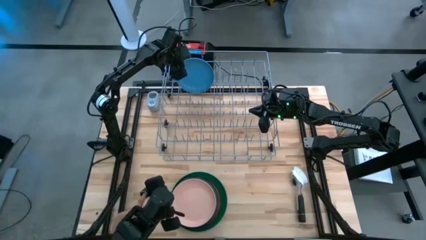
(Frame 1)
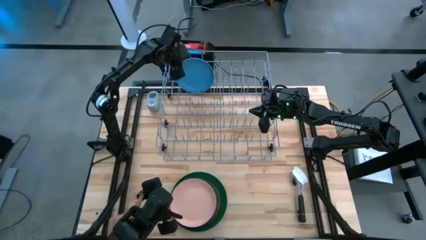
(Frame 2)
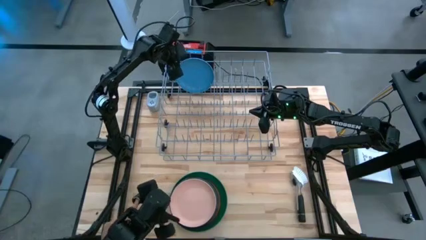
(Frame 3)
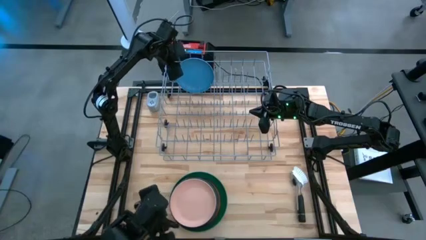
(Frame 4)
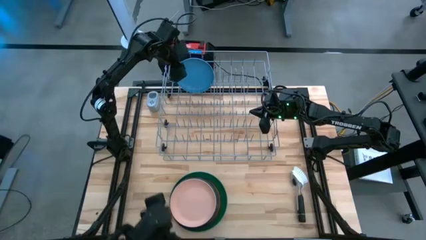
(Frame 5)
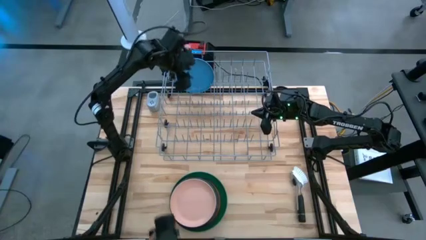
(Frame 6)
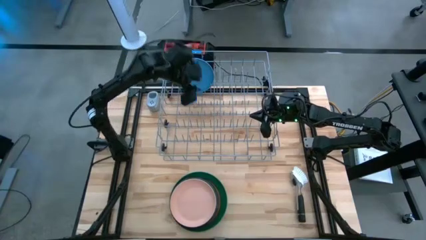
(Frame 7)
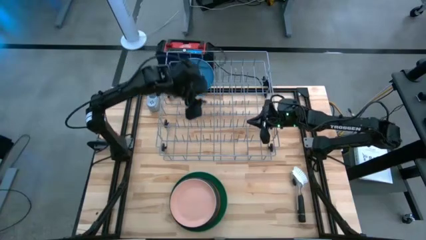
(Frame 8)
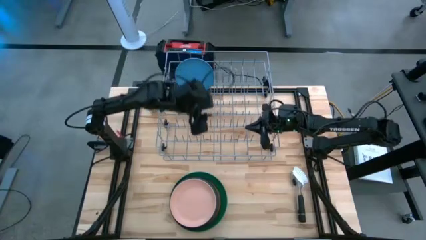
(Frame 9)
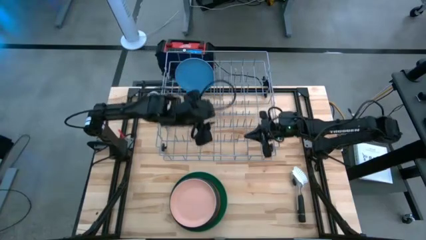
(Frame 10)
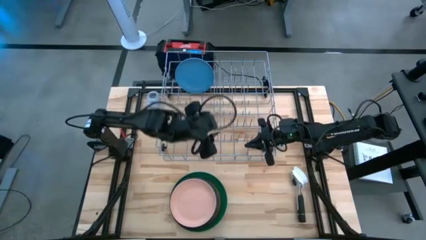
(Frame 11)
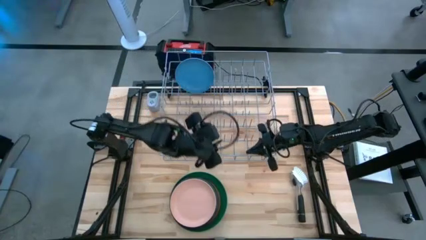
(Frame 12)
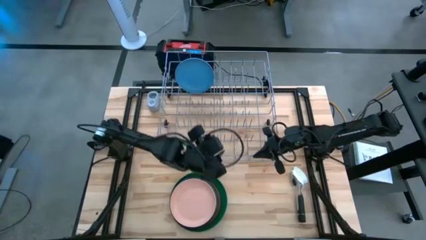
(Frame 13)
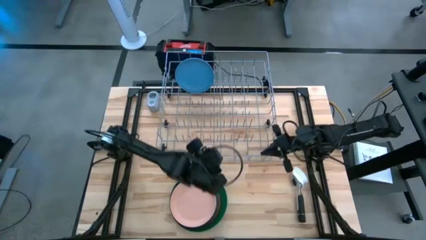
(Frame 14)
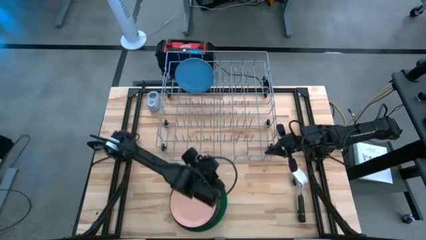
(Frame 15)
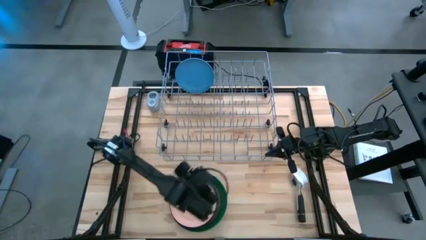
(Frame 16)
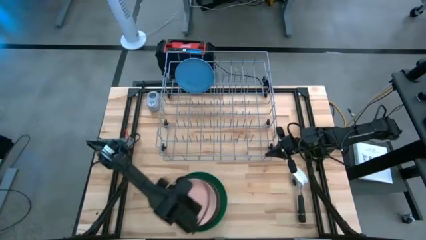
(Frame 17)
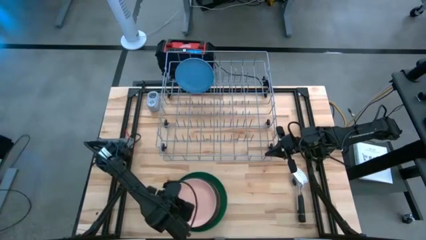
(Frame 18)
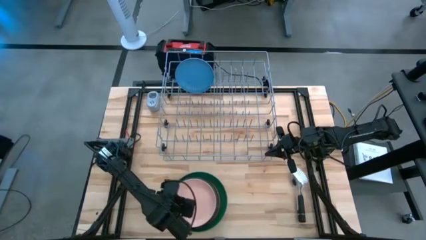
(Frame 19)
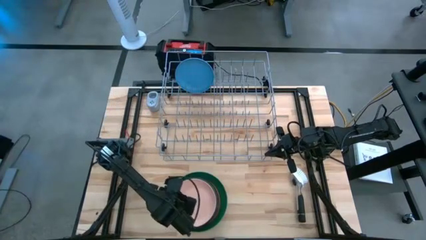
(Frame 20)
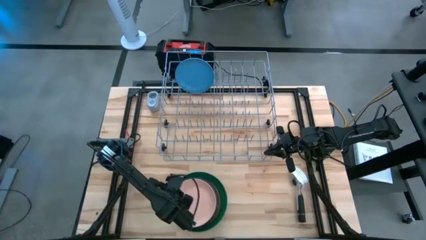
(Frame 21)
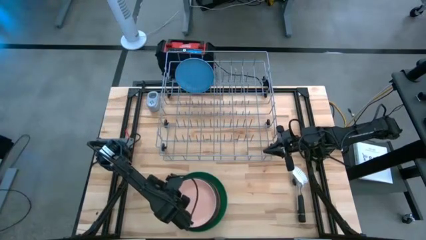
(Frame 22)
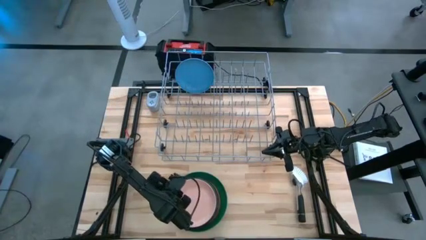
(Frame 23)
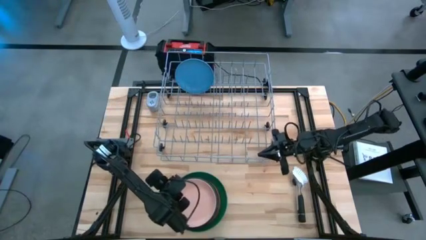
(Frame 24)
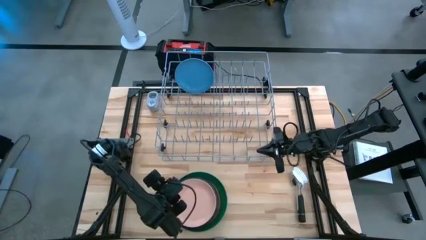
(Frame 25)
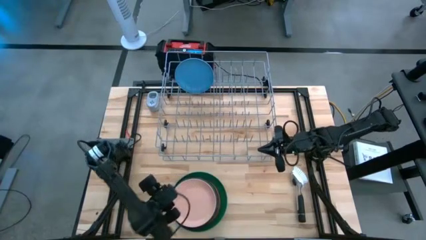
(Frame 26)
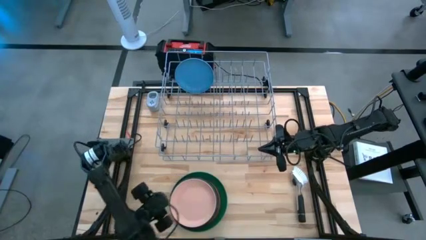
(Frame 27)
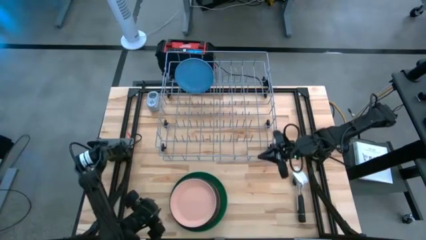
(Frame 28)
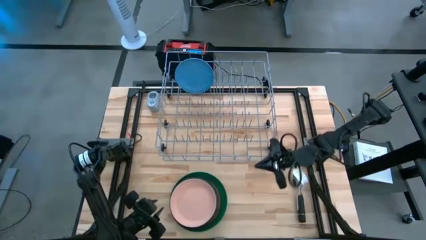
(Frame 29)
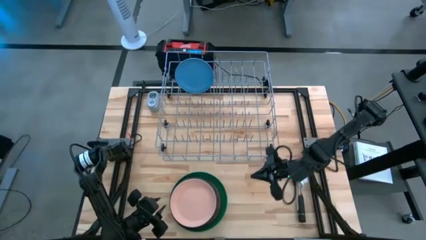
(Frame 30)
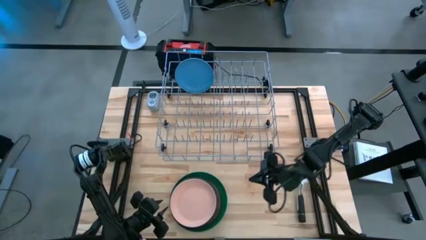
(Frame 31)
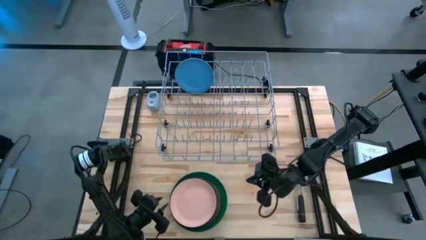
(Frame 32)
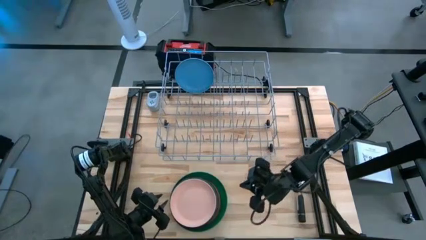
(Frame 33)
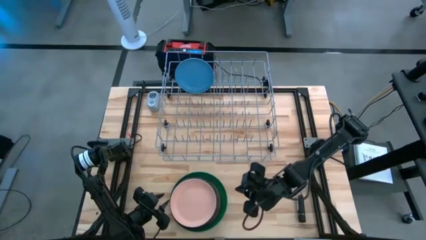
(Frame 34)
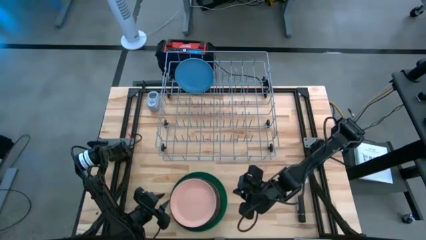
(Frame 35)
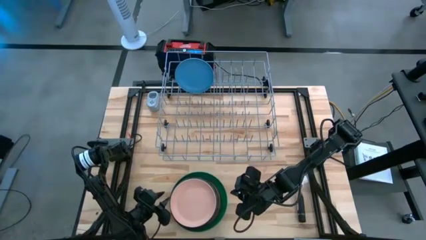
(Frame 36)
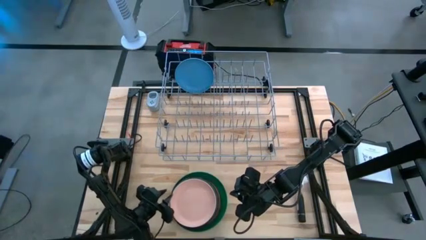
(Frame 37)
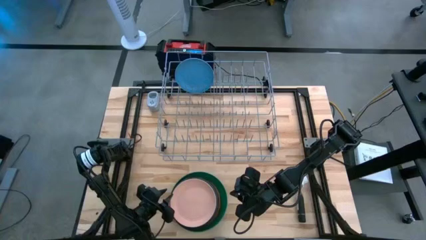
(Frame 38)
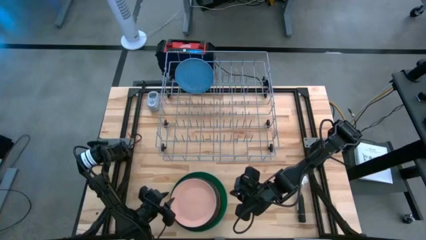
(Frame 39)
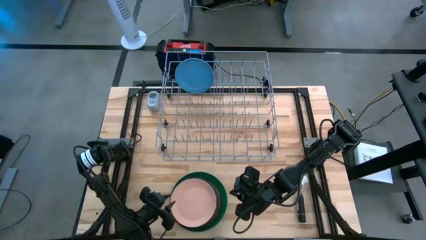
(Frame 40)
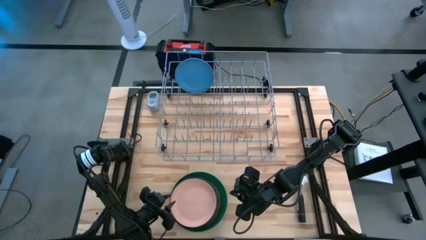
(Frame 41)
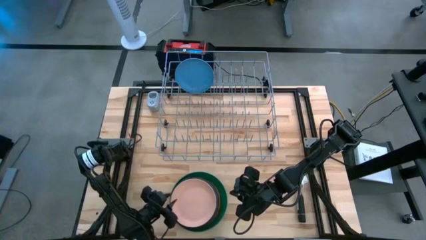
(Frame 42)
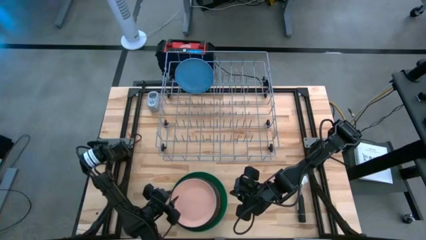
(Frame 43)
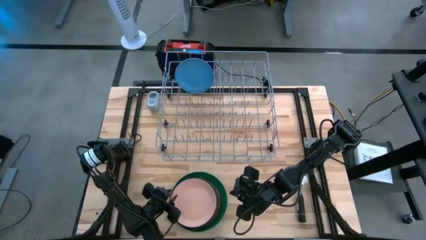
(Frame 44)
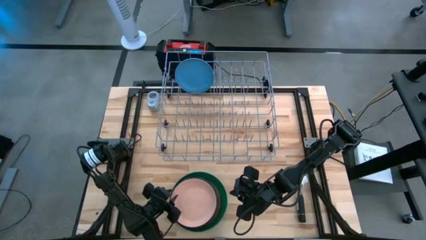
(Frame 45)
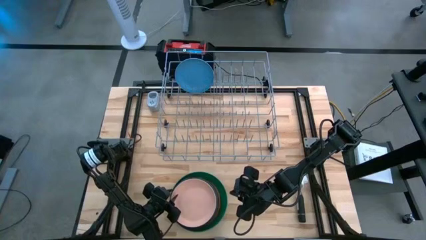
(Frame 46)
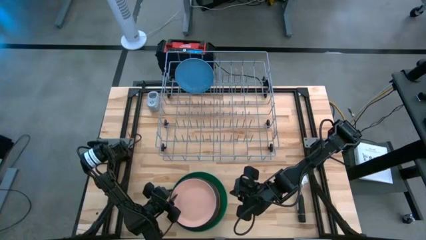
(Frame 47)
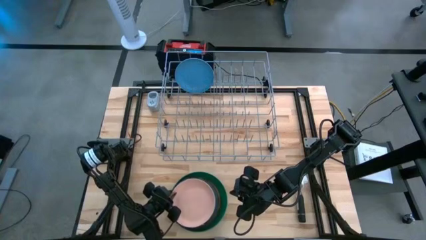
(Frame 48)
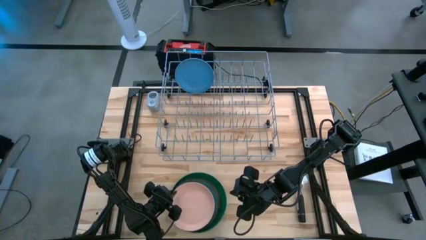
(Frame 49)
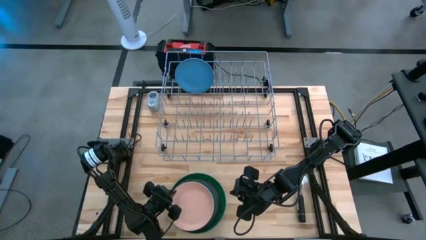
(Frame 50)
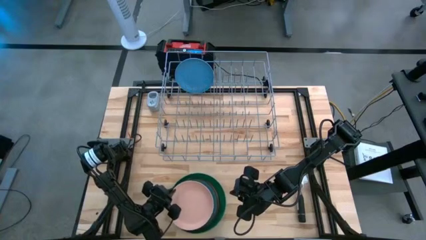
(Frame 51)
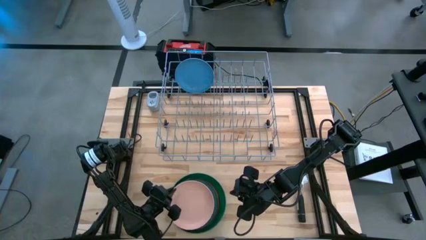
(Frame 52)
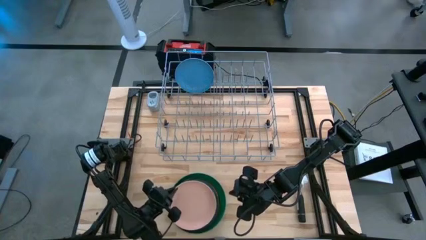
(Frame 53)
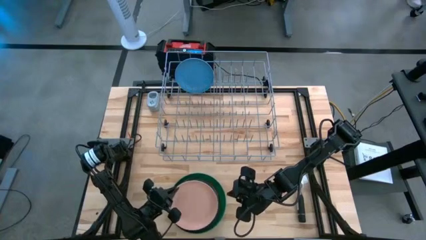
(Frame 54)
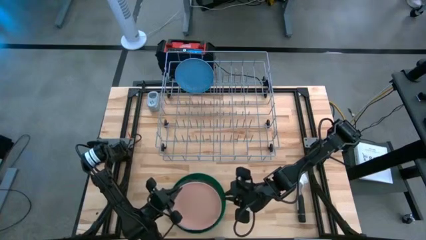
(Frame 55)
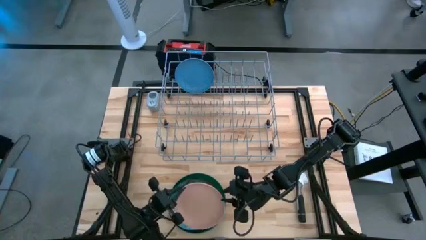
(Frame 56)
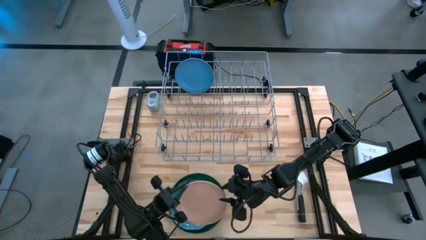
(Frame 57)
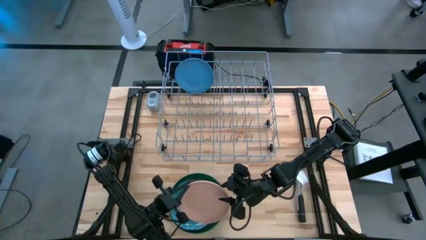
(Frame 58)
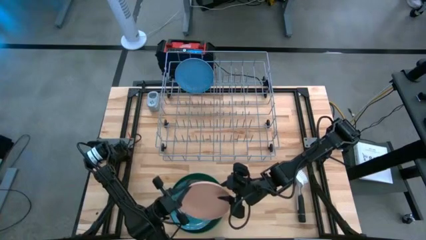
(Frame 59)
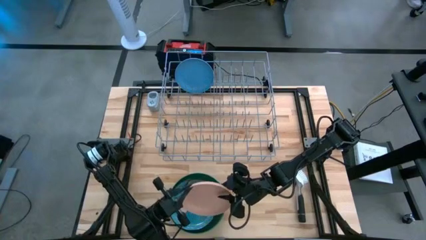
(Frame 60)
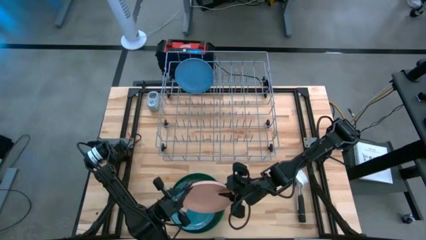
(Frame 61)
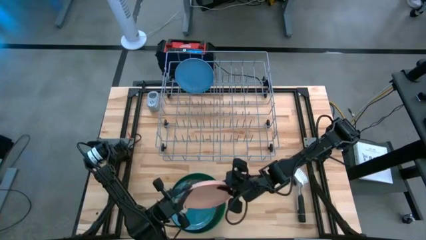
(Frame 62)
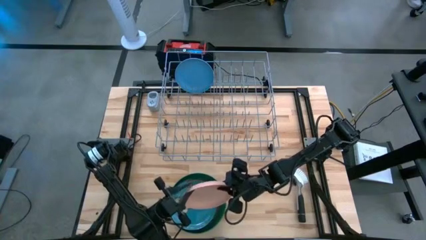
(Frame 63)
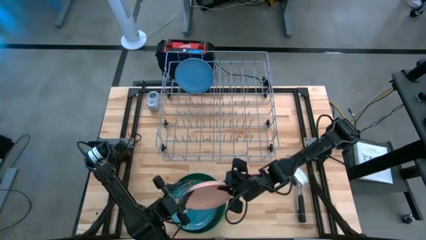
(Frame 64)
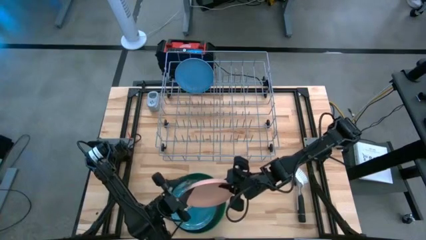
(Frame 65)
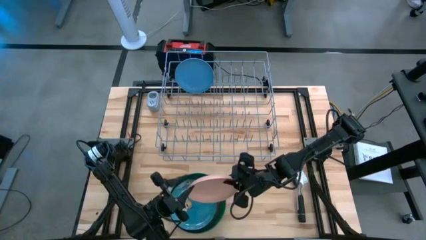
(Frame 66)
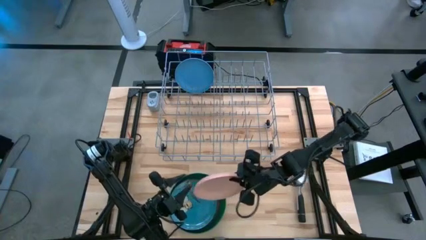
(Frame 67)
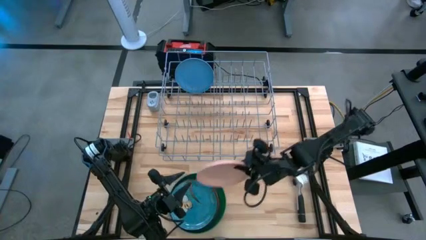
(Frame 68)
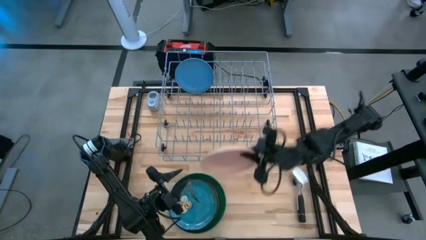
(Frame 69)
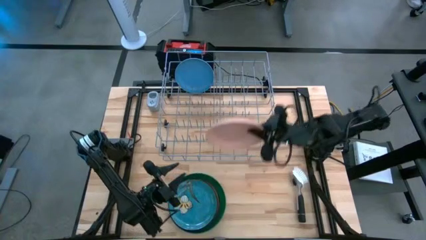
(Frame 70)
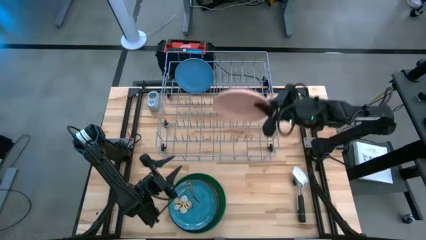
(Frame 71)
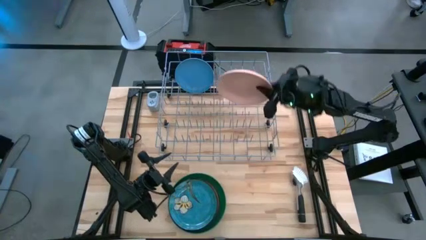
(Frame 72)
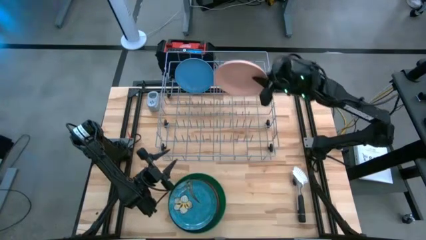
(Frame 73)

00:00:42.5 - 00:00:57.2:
Task: Sort dishes
Put the light pink plate into the dish rack

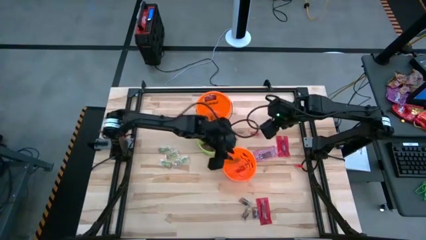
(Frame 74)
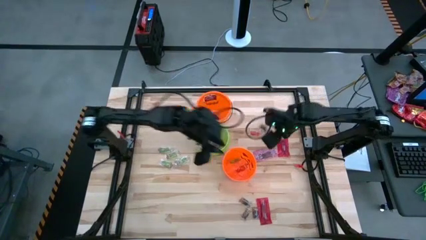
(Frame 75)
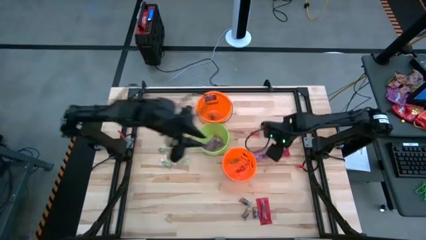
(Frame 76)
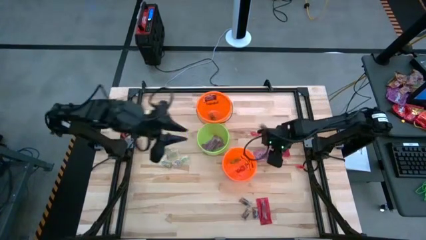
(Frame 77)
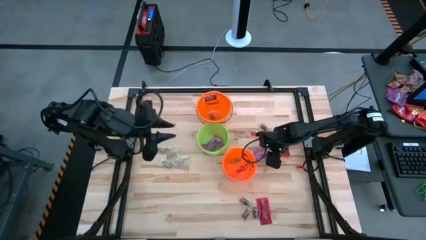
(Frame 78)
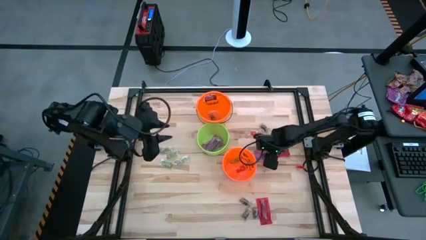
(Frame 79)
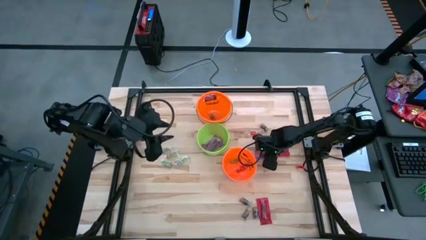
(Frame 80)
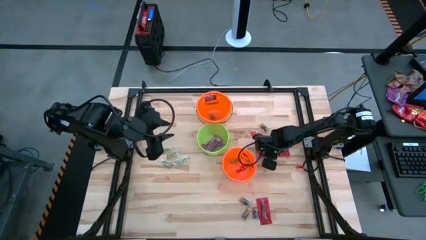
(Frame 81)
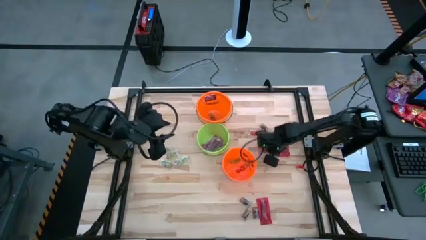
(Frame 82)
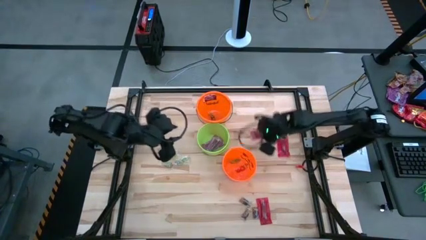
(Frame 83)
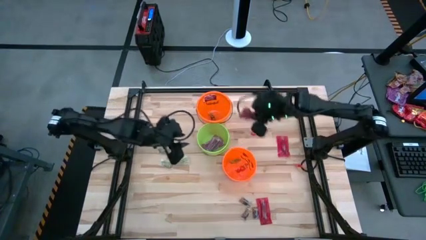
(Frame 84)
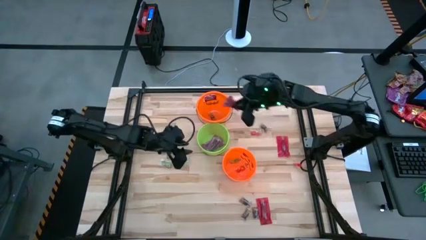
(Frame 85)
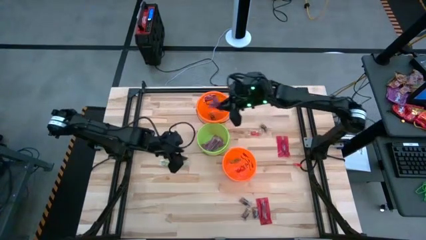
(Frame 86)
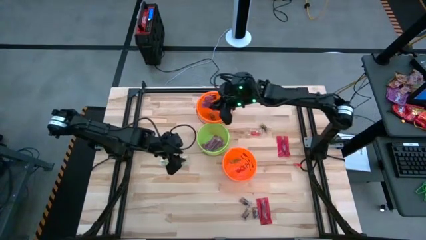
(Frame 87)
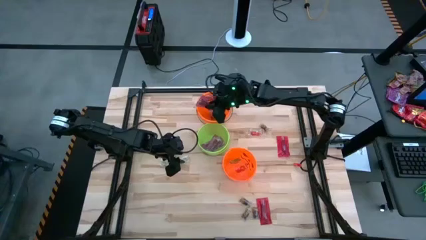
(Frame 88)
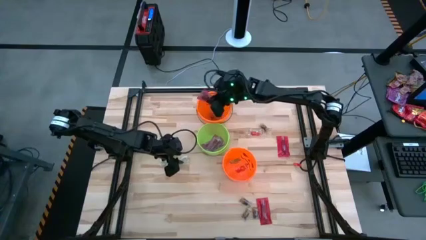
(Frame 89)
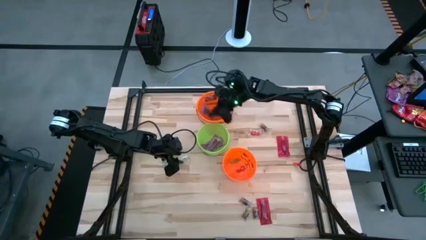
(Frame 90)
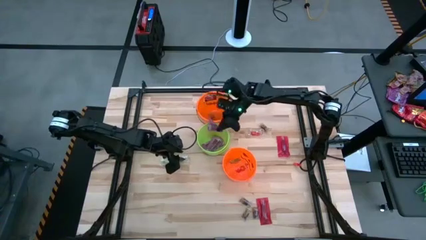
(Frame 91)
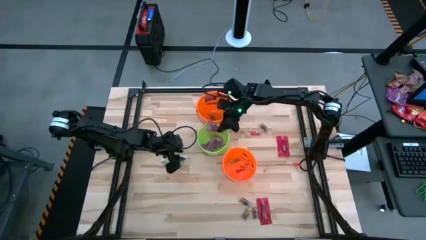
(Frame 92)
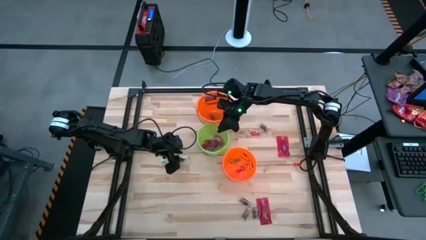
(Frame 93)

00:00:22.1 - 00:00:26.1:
Task: Sort candy by brand, put in halloween buckets
Put the red candy into the green bucket
